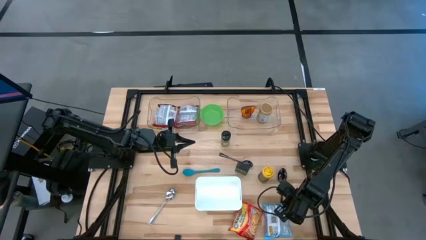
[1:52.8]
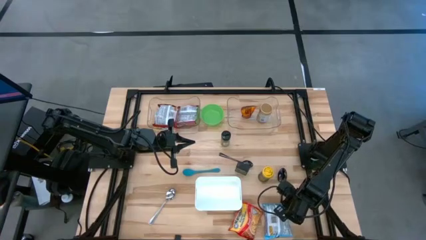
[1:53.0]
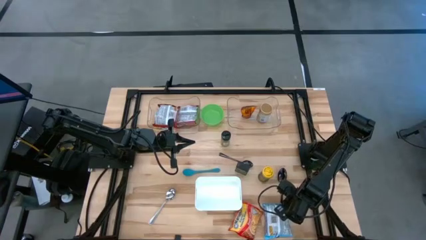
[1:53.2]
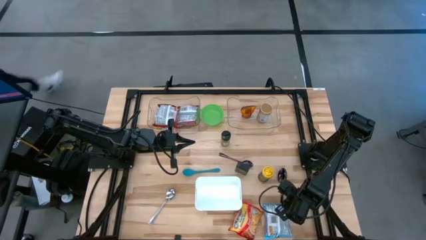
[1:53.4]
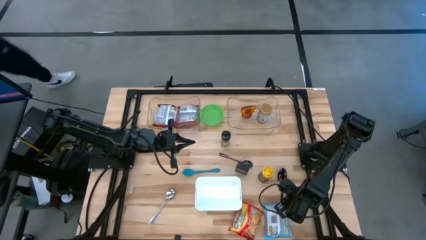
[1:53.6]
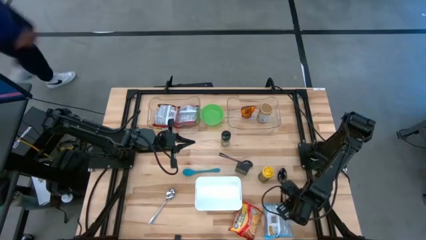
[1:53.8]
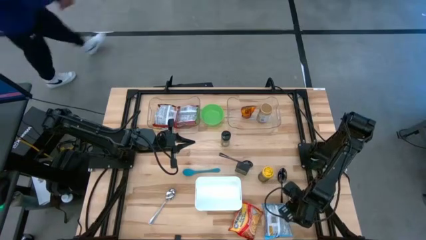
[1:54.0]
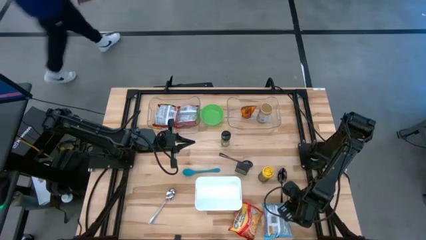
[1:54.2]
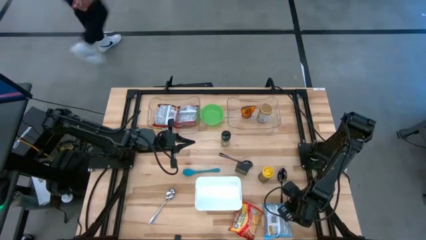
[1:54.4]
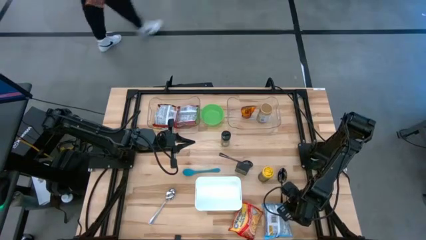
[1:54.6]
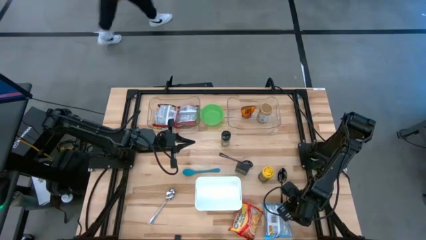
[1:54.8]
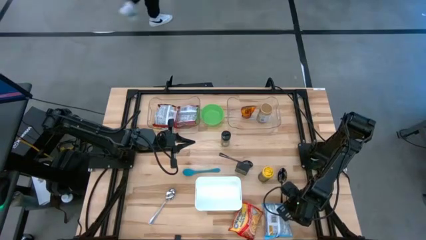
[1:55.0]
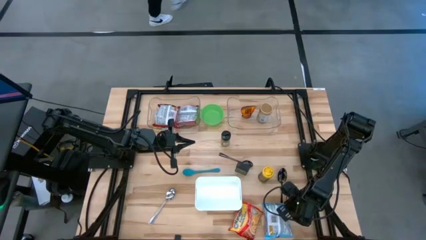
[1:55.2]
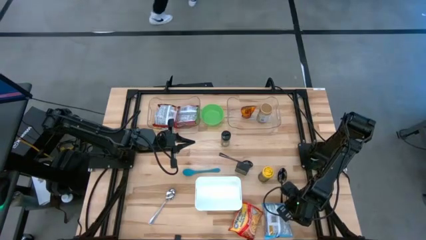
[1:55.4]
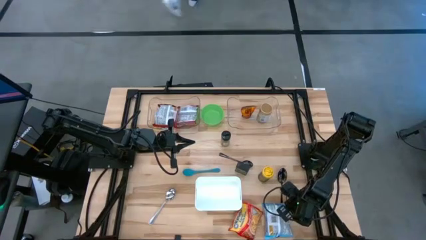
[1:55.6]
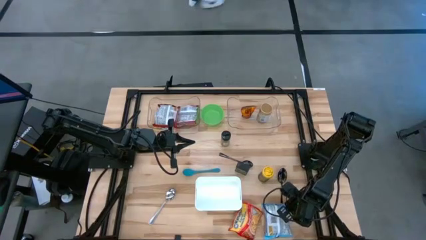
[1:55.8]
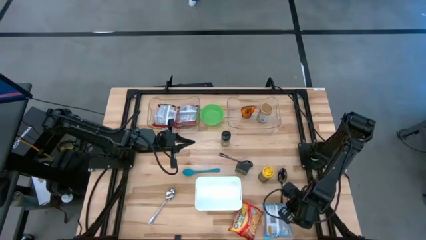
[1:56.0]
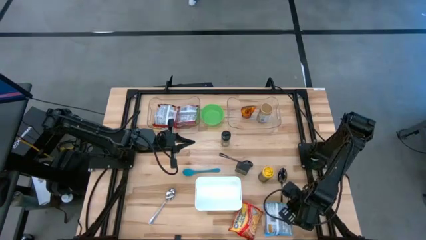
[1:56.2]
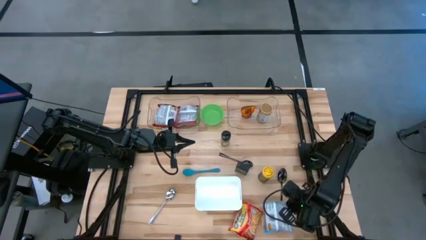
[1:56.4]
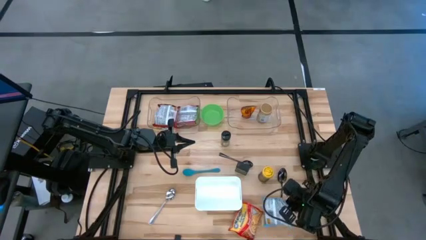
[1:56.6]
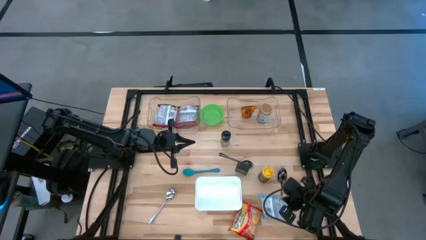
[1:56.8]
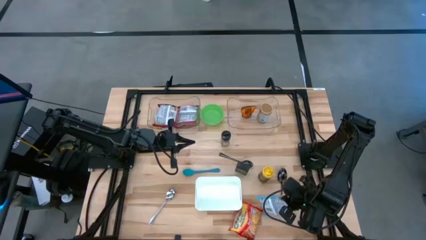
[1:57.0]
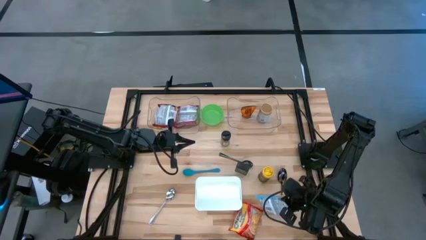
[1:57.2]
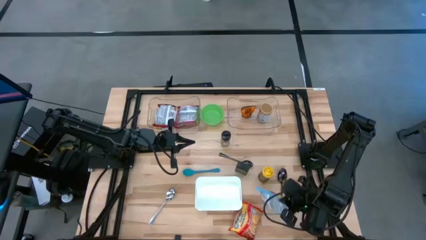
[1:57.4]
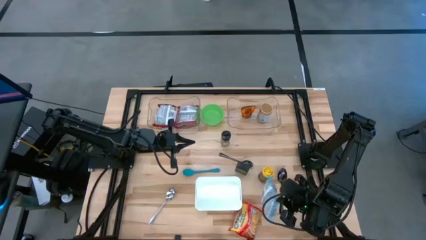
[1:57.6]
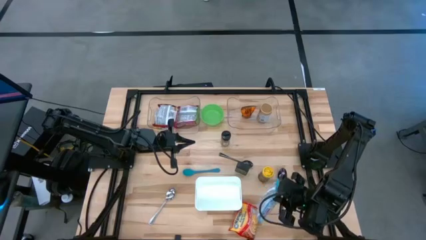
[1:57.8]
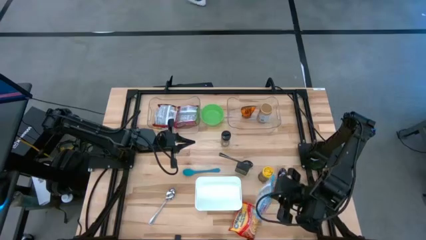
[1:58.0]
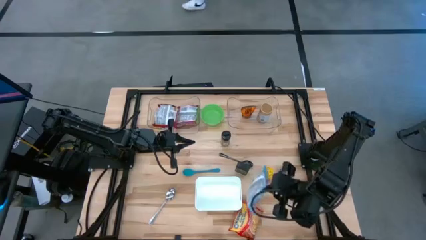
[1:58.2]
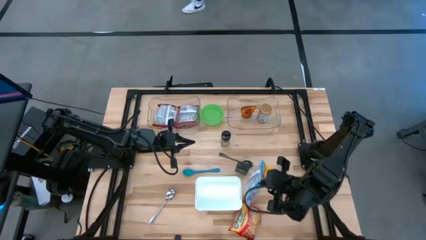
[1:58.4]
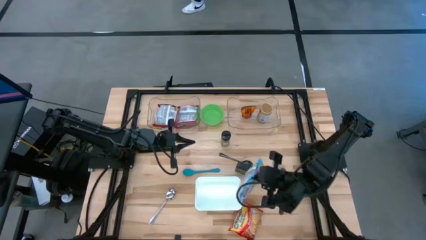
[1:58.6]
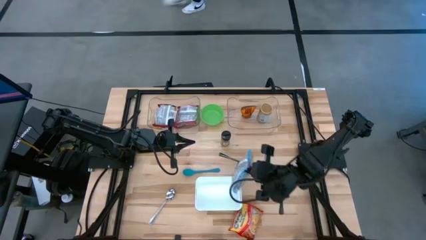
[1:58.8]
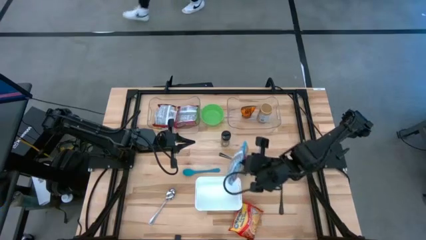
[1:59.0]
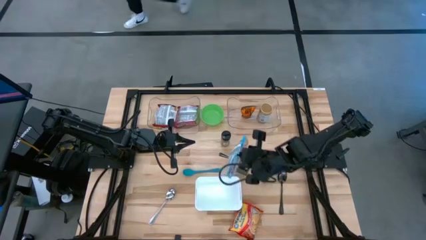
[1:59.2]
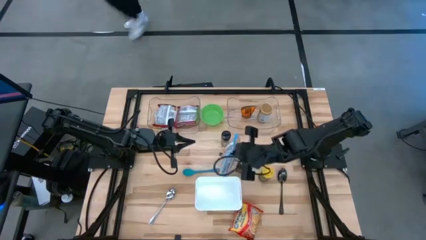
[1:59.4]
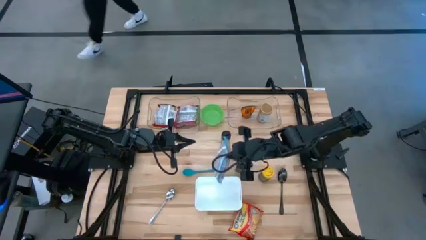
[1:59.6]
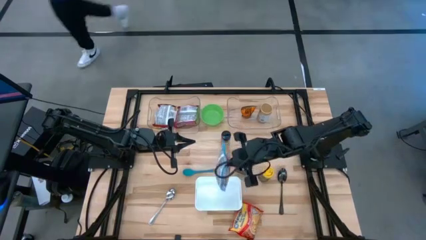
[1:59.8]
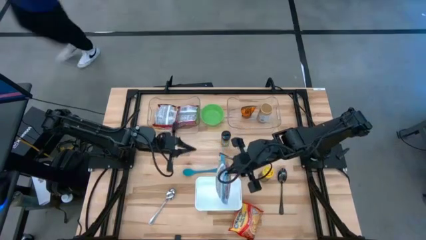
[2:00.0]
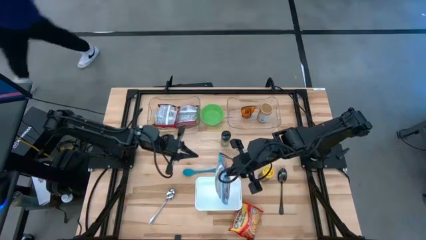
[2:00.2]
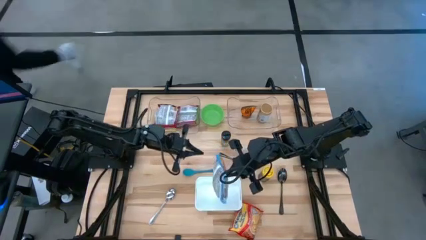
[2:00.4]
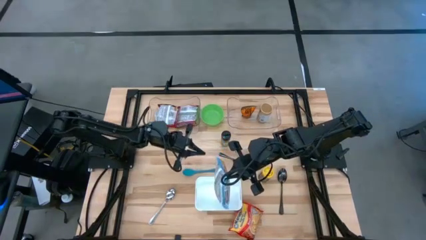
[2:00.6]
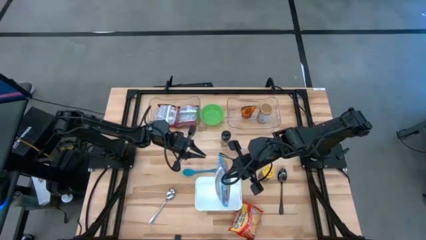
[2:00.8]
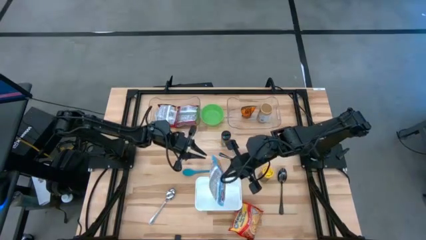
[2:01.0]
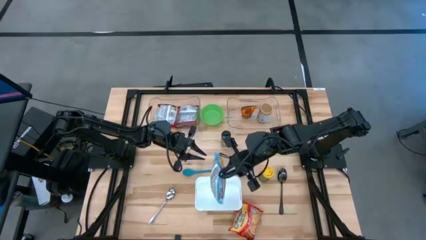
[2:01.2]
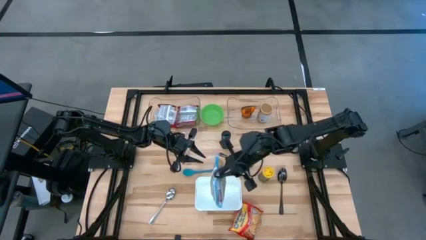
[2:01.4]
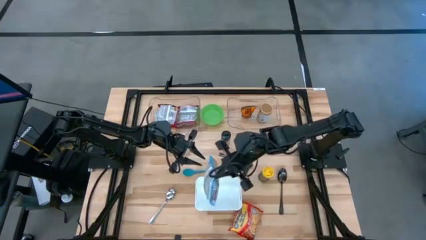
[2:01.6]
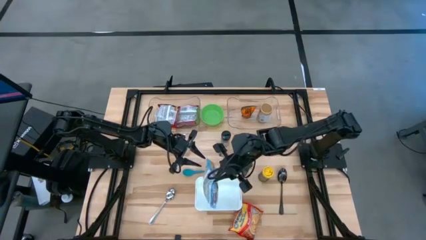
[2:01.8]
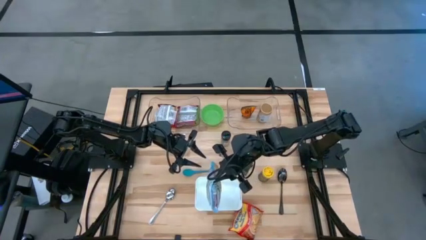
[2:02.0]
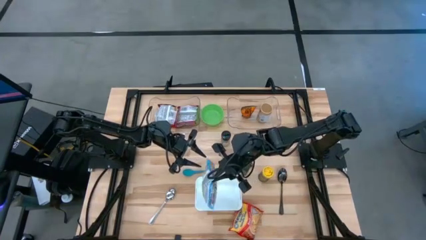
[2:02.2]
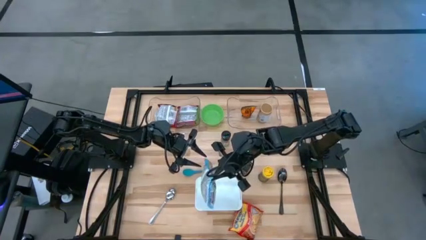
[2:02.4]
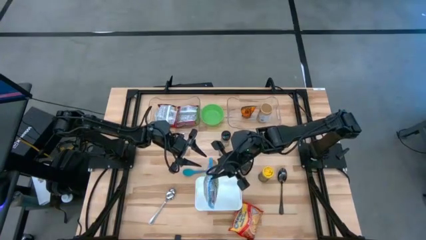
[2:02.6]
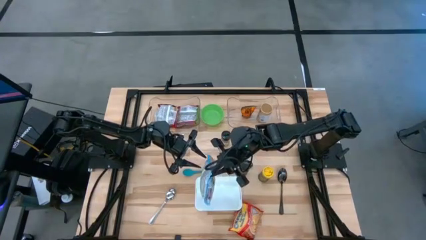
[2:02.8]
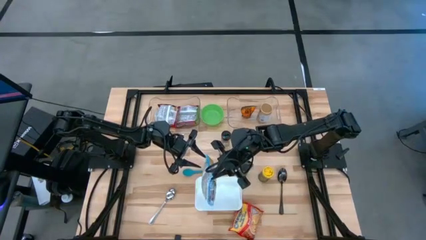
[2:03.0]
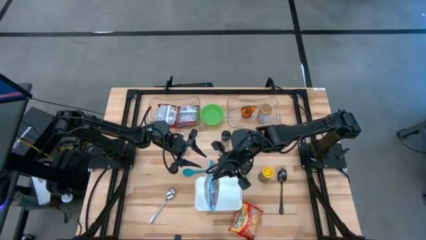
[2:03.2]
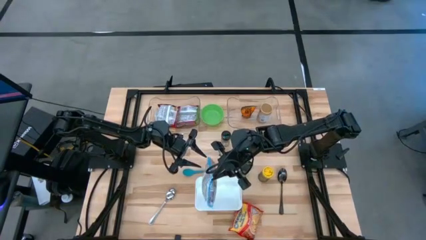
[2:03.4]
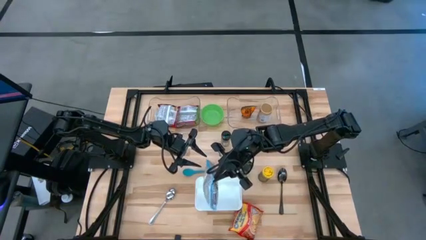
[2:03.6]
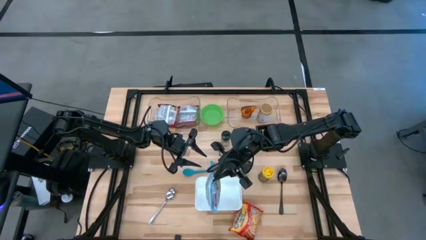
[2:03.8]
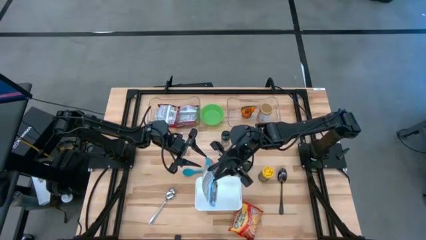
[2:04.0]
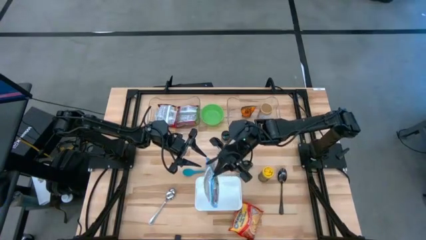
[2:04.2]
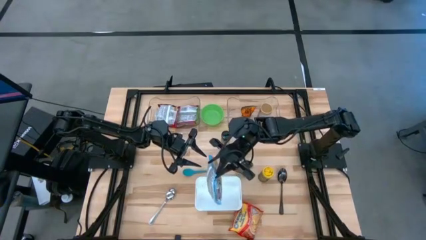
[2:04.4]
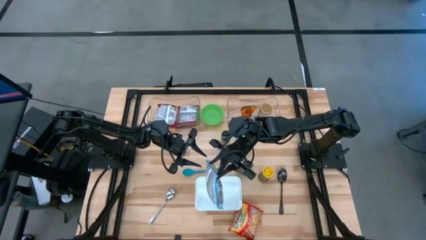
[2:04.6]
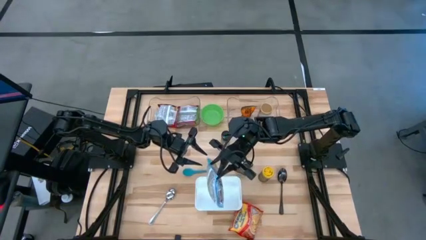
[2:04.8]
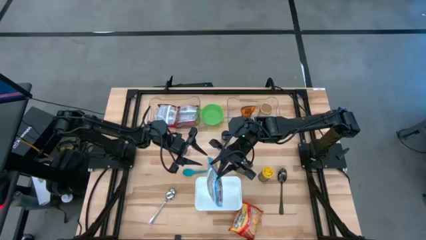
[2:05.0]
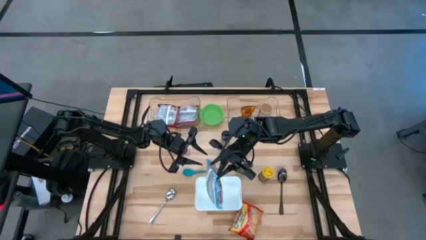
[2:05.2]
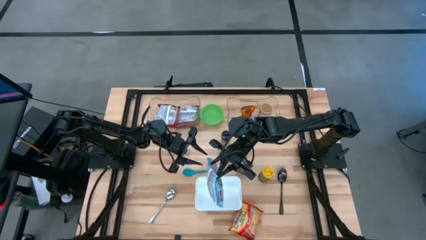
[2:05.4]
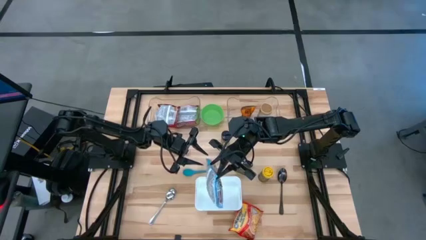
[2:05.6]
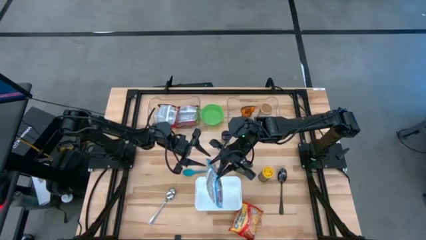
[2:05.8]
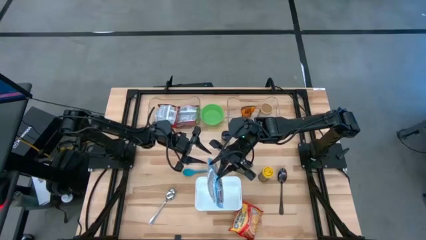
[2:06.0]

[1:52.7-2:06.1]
Task: Pick & Place Food Item
Put the blue noodle pack into the left transparent bin
